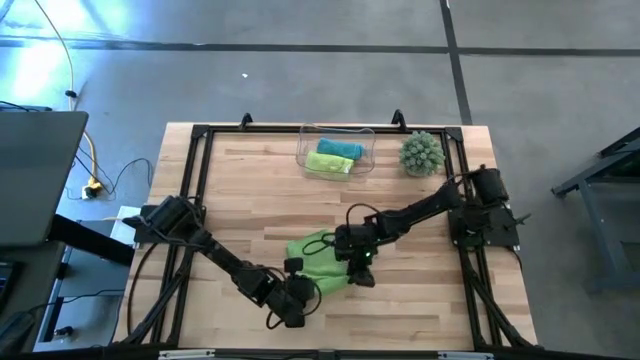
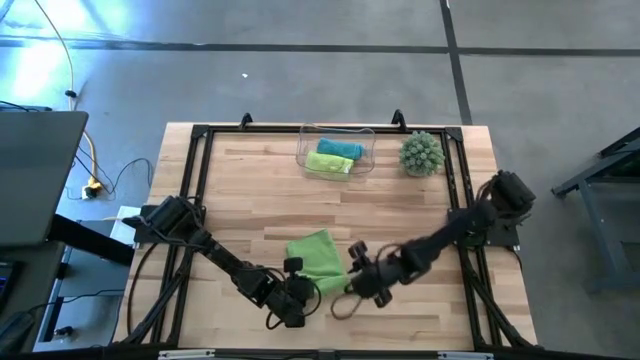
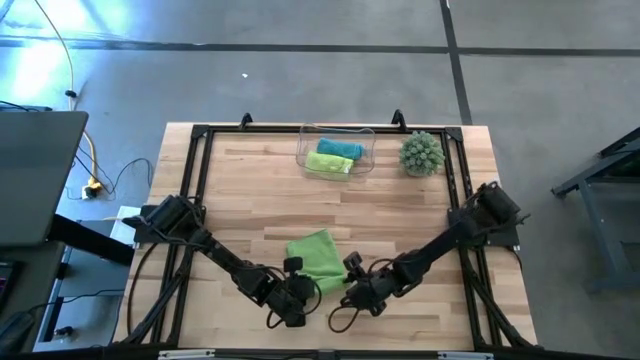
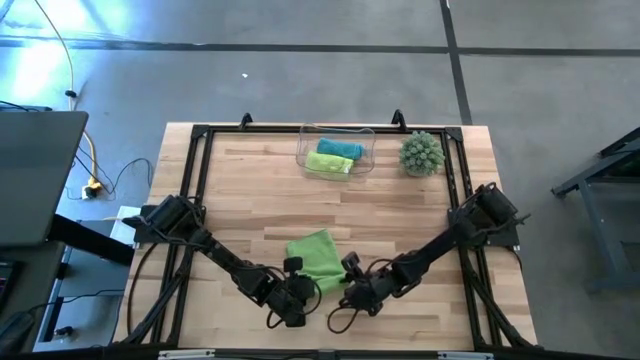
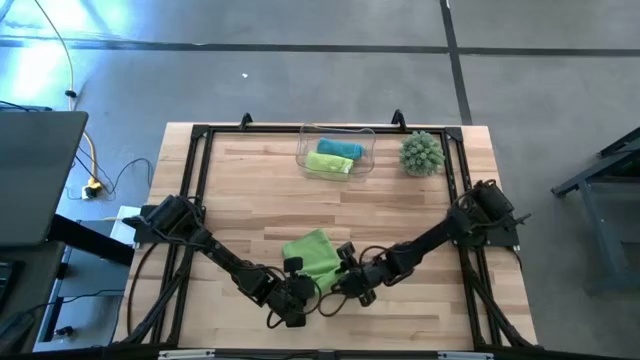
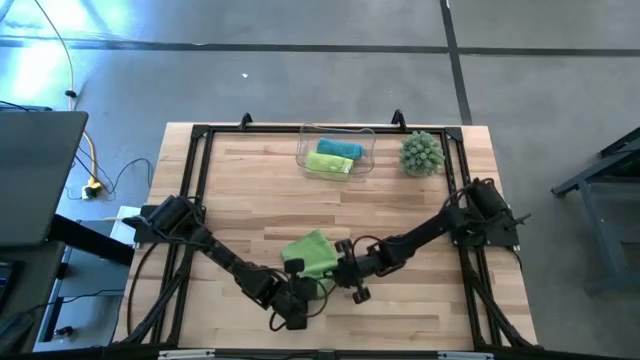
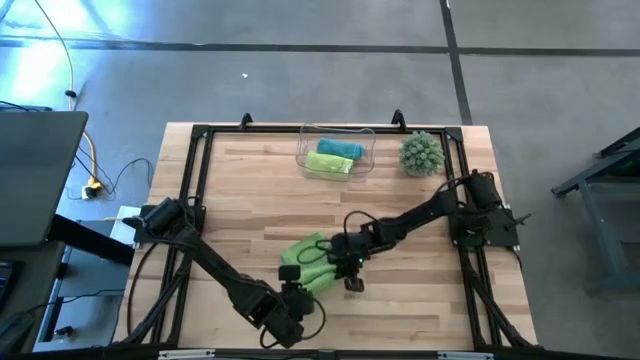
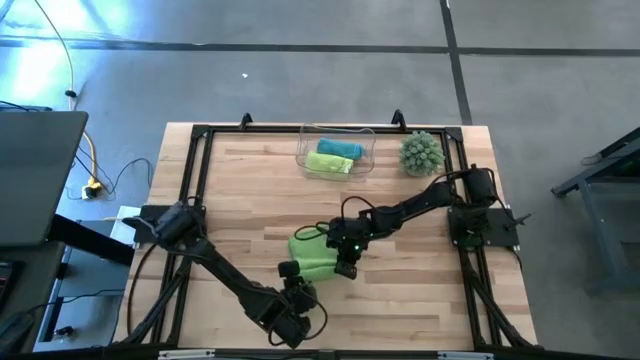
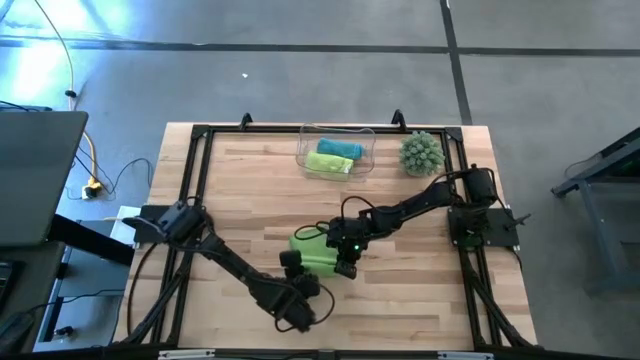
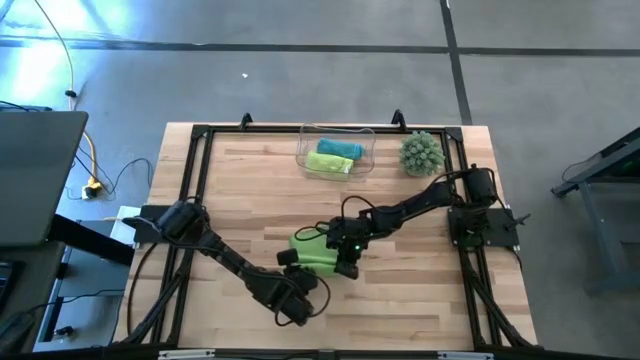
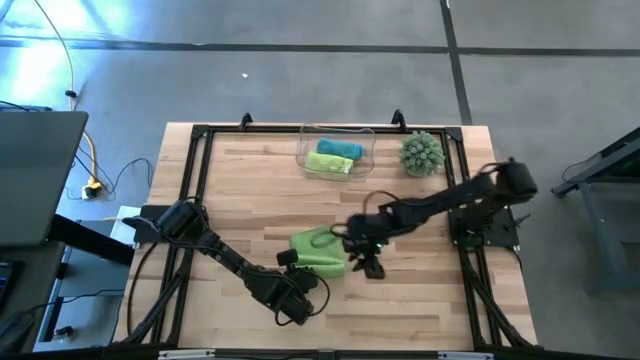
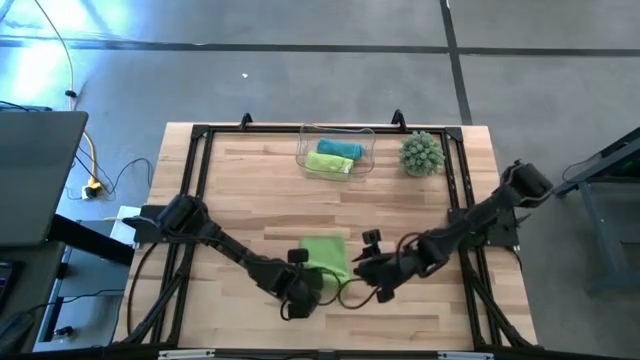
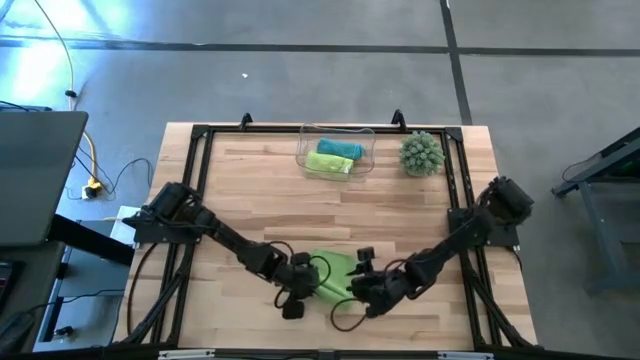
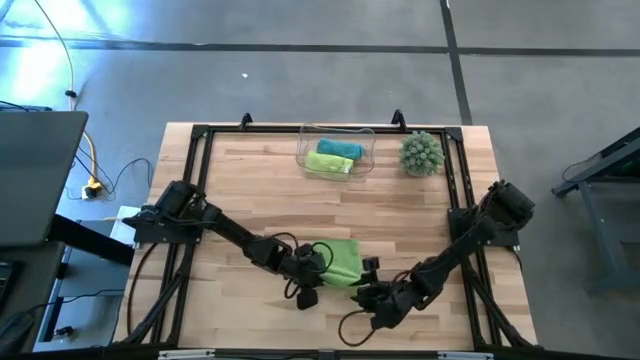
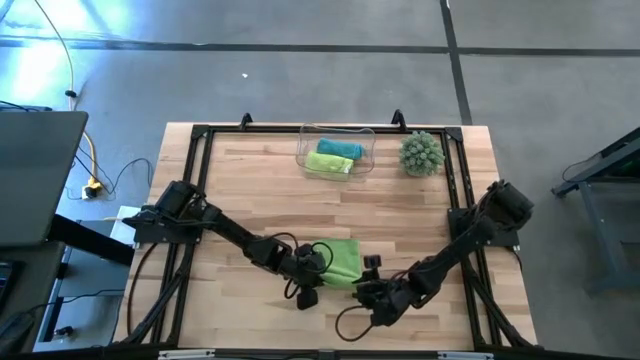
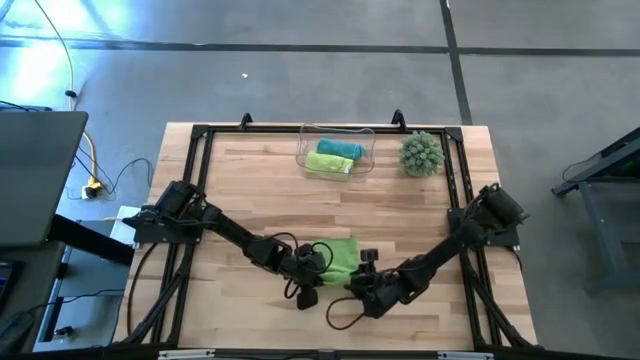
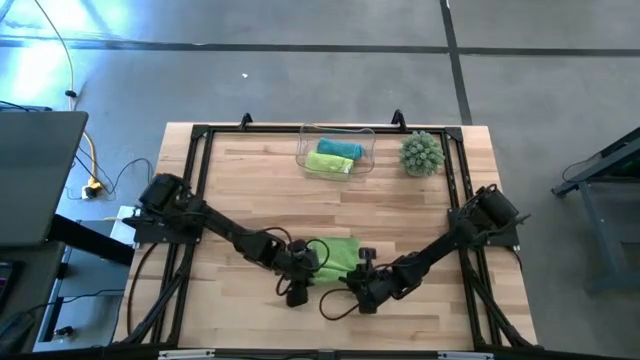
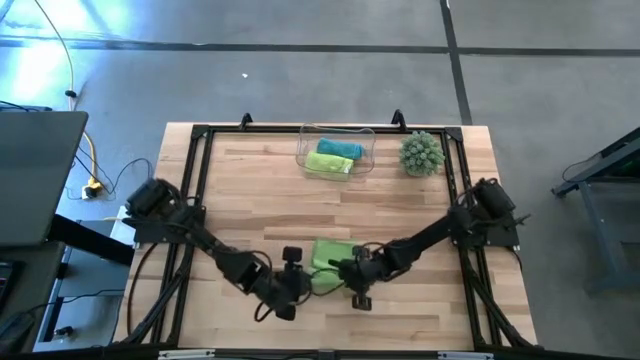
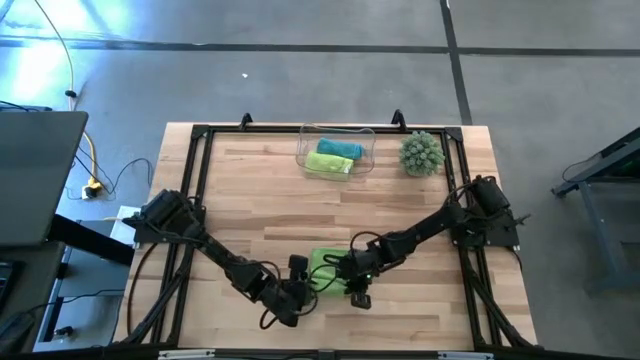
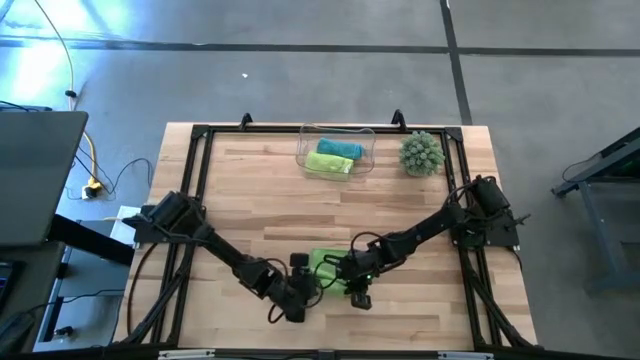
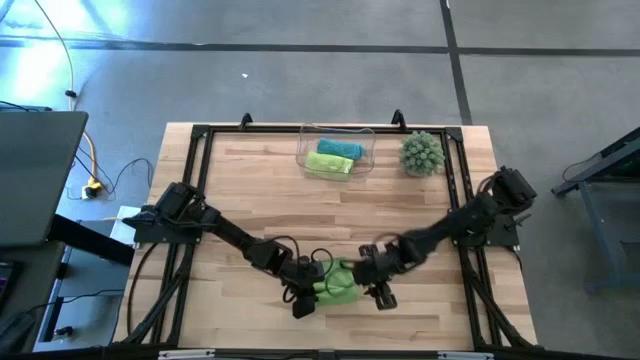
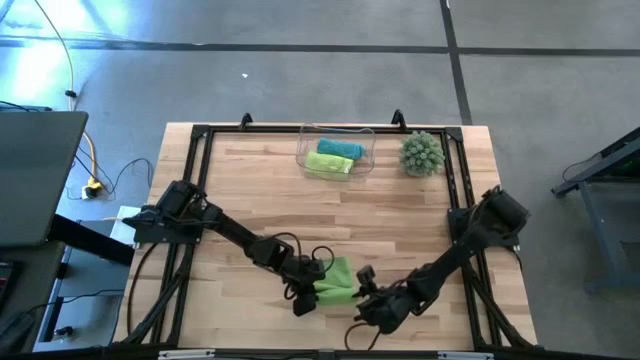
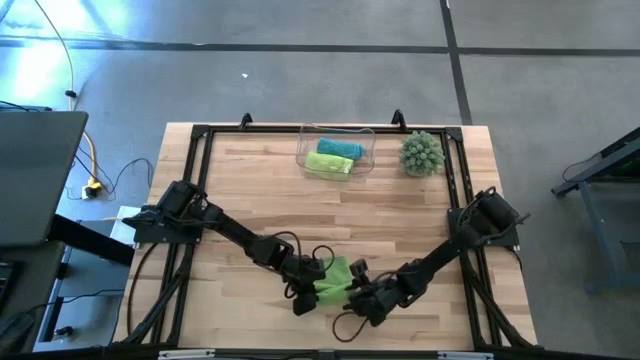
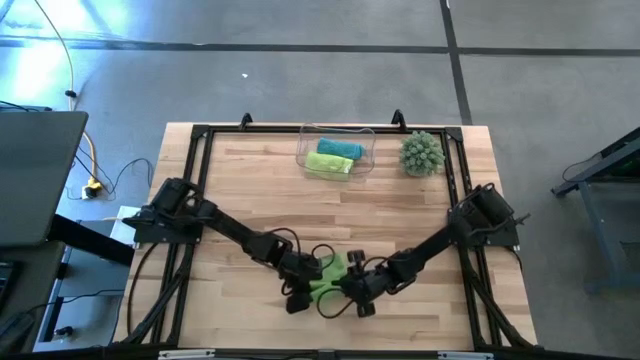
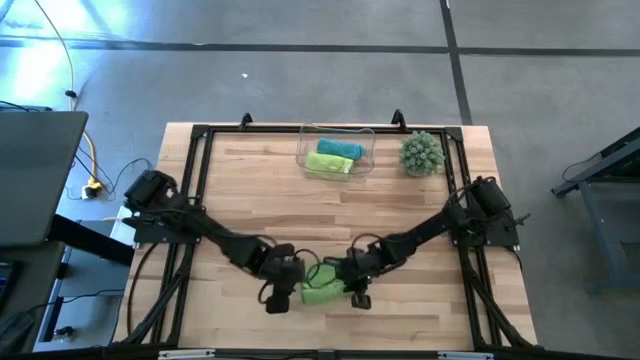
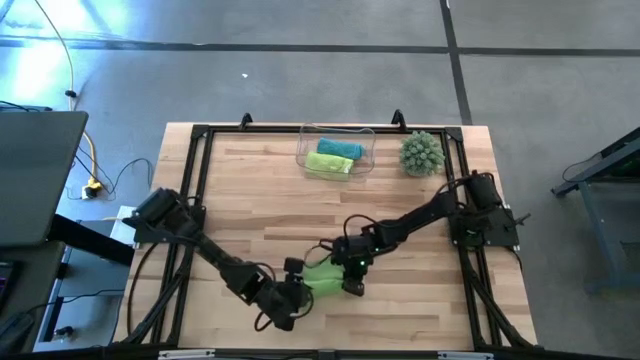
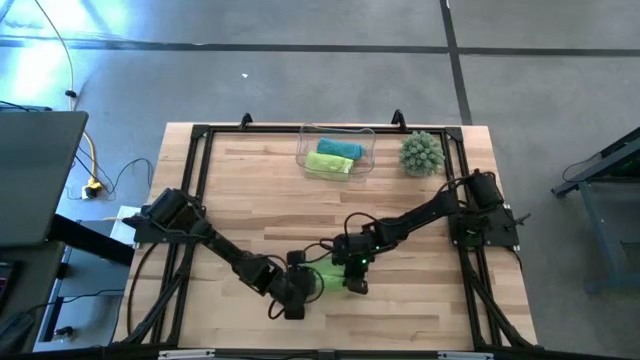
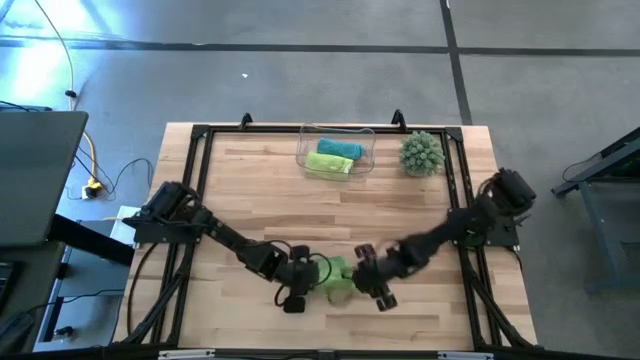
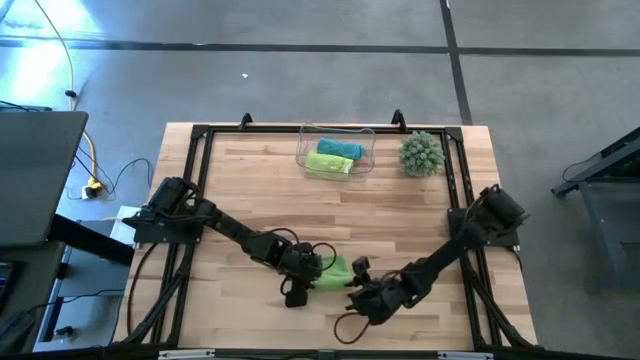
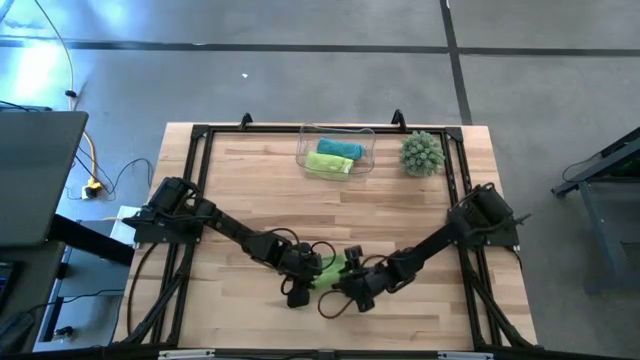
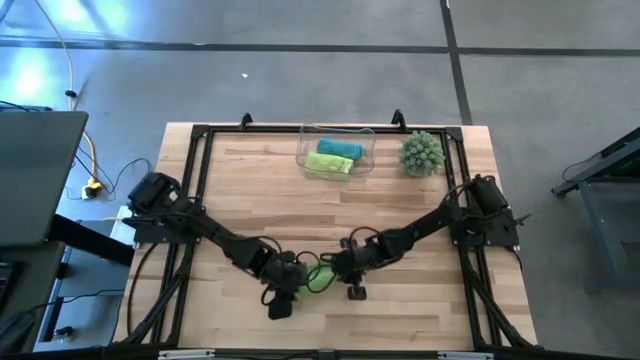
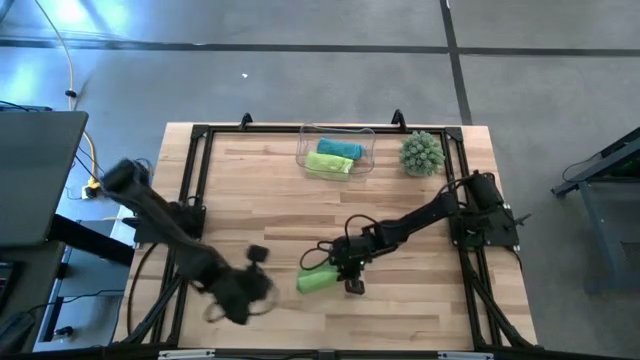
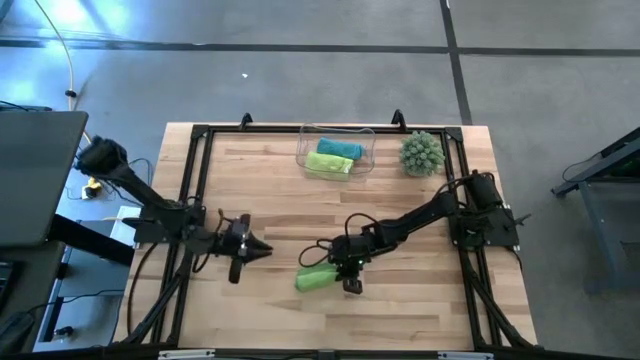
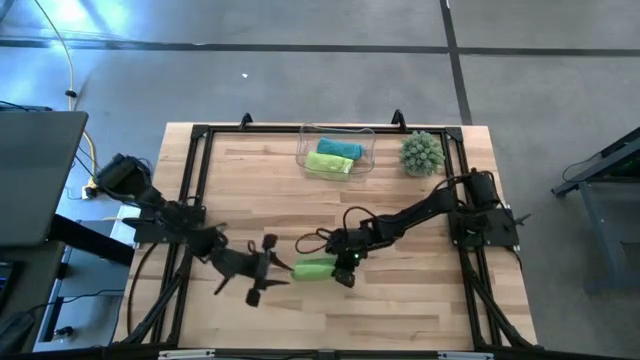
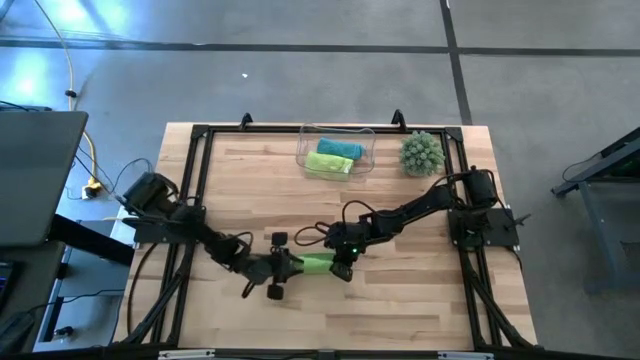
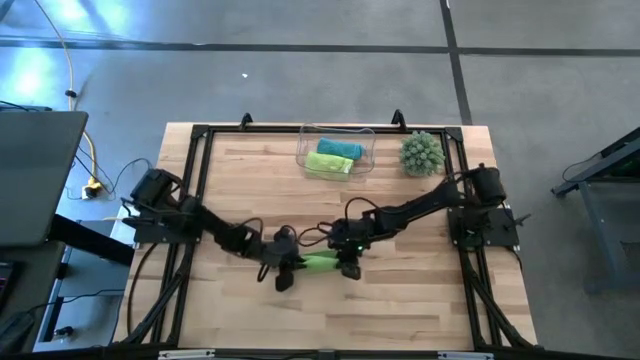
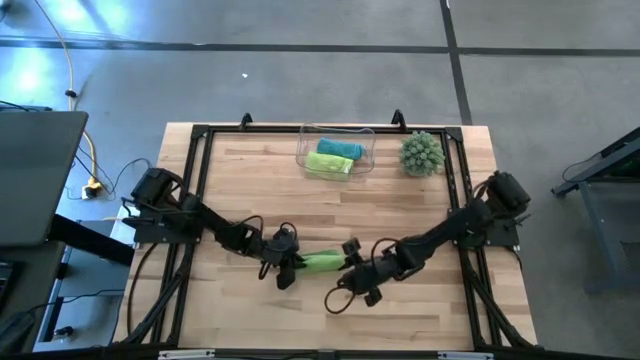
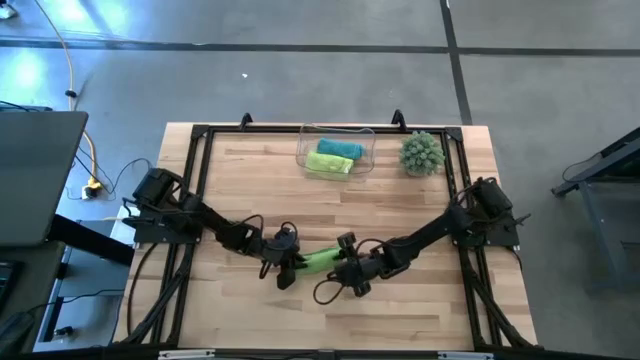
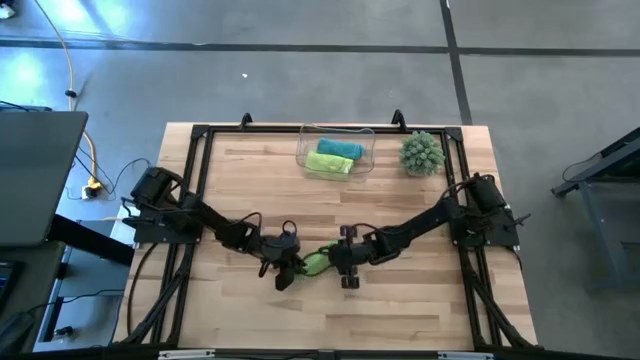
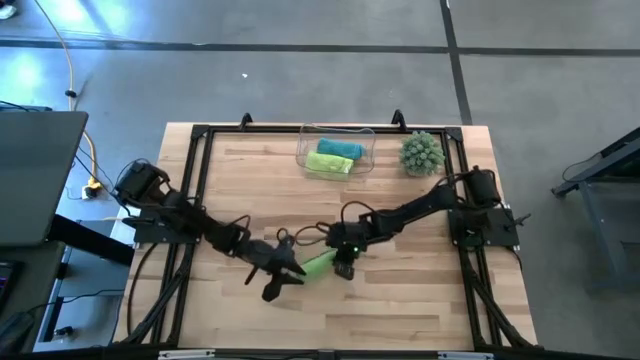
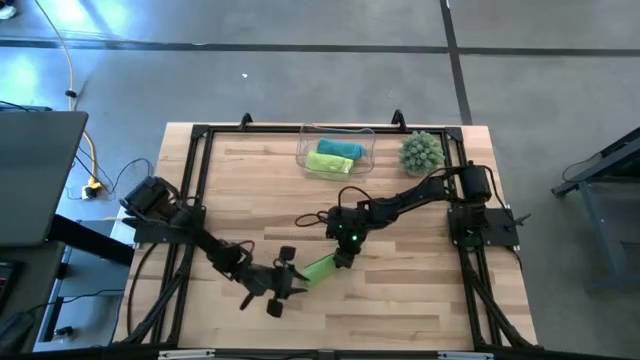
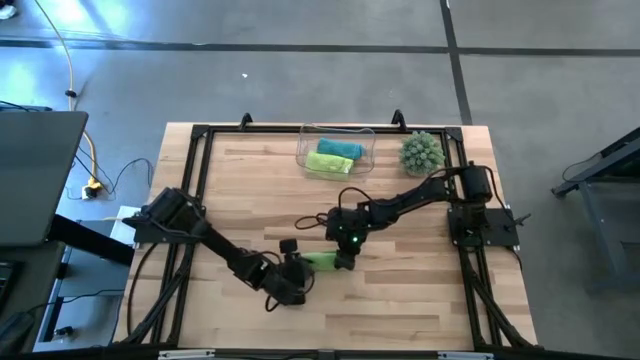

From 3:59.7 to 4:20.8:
Task: Roll microfiber towels into tight, uniform cylinder then place into a basket
Roll the green microfiber cloth
